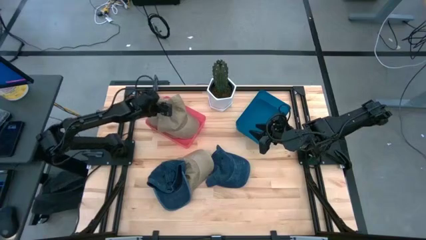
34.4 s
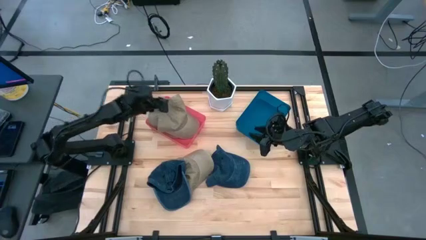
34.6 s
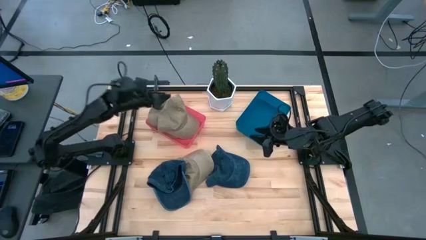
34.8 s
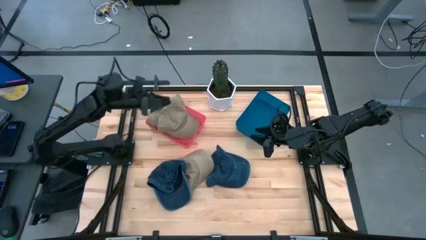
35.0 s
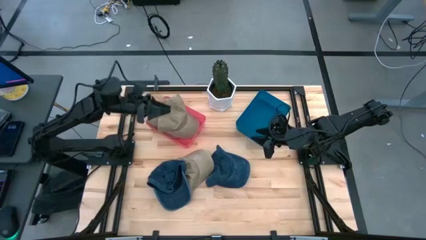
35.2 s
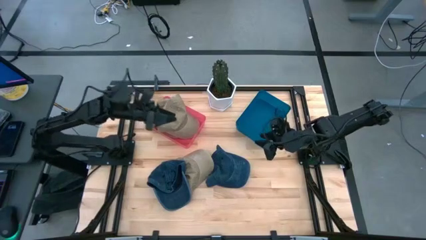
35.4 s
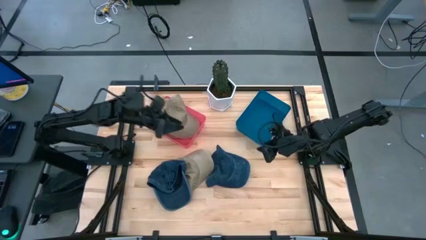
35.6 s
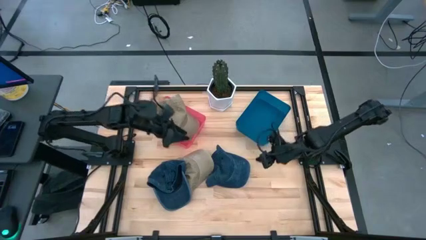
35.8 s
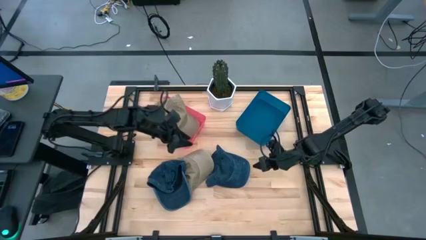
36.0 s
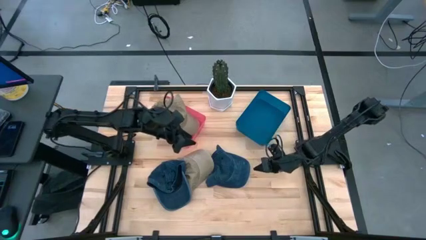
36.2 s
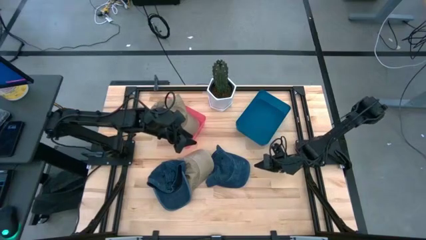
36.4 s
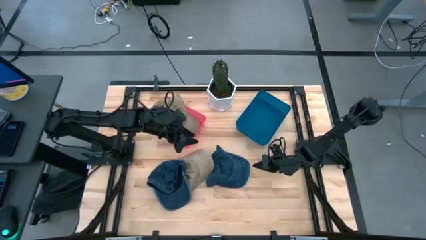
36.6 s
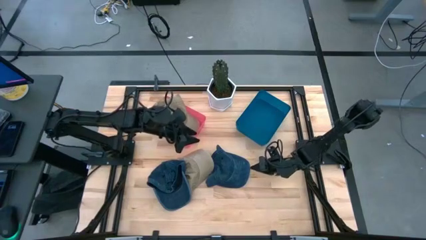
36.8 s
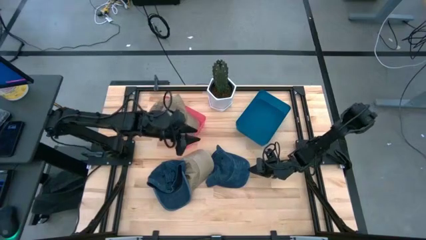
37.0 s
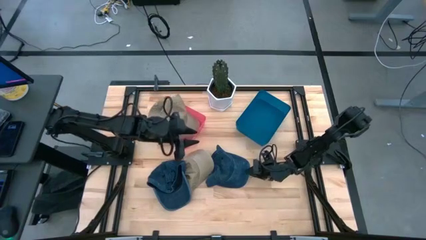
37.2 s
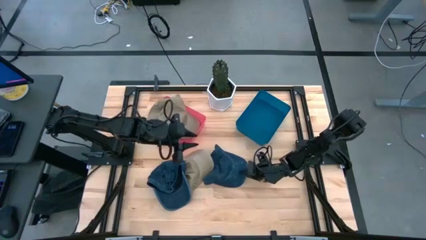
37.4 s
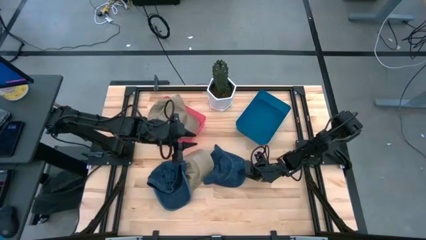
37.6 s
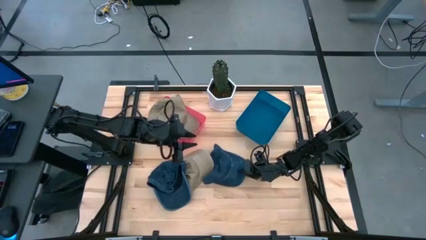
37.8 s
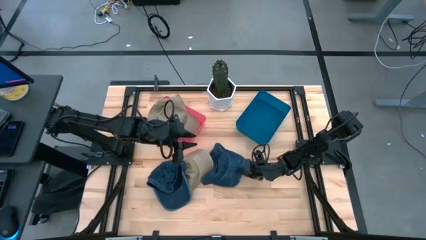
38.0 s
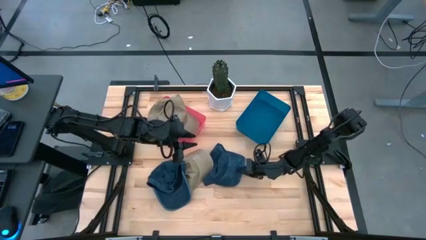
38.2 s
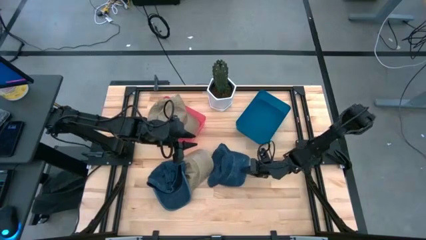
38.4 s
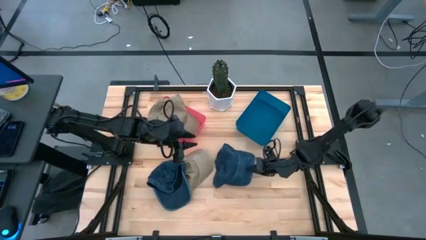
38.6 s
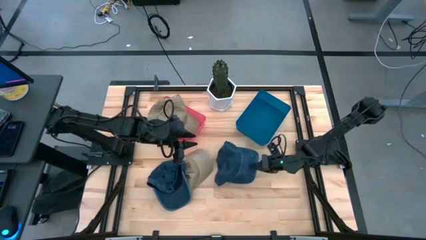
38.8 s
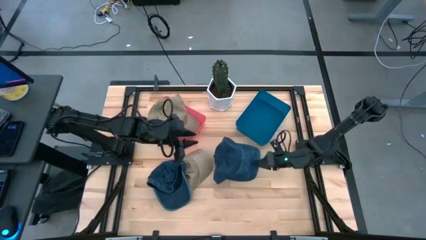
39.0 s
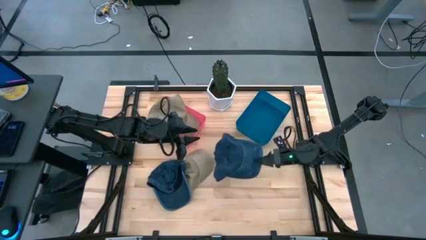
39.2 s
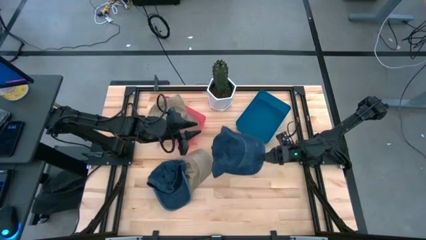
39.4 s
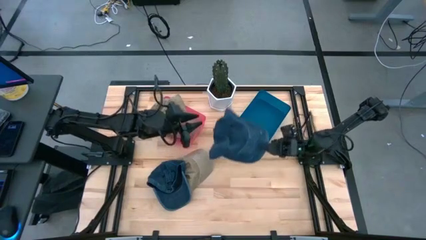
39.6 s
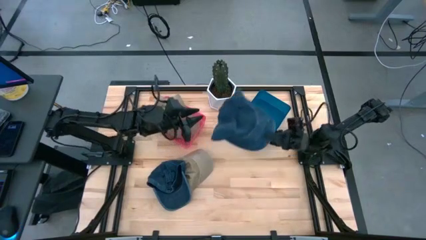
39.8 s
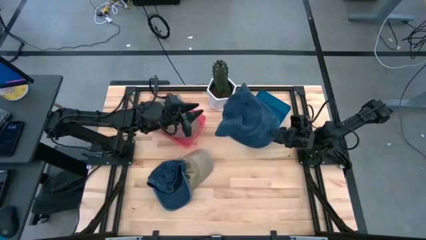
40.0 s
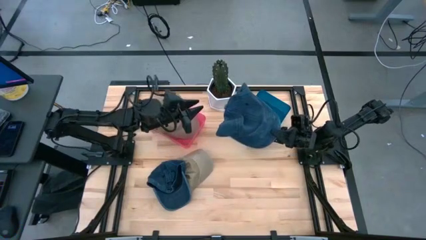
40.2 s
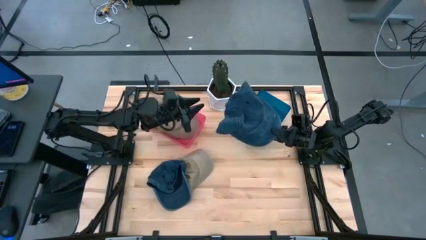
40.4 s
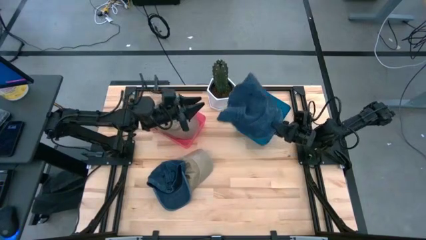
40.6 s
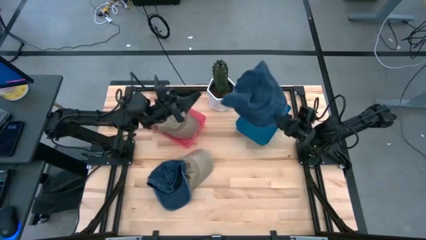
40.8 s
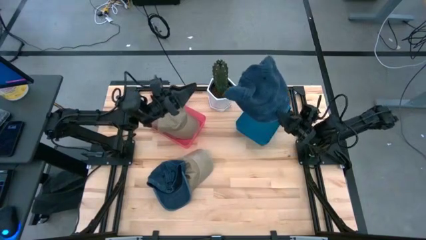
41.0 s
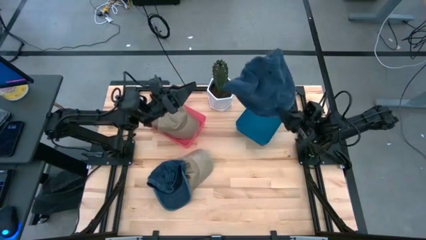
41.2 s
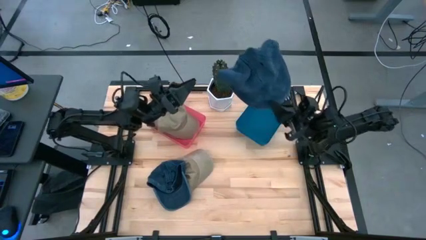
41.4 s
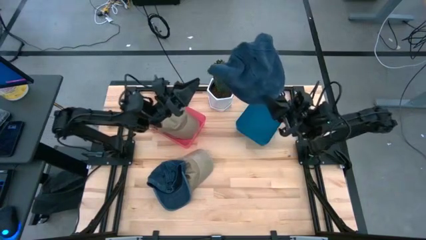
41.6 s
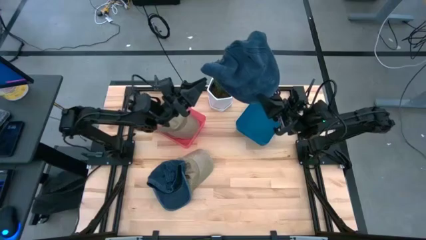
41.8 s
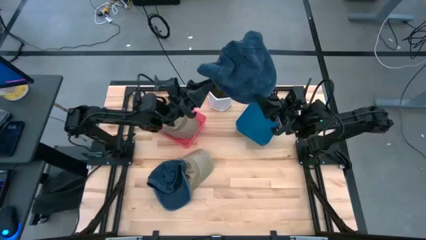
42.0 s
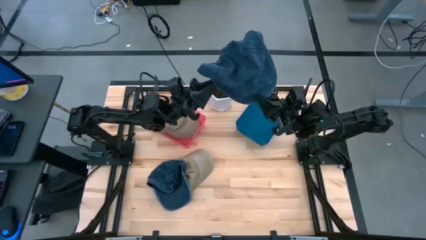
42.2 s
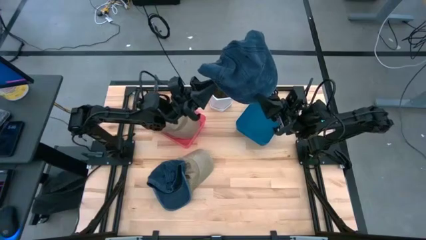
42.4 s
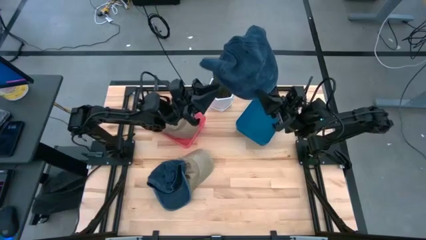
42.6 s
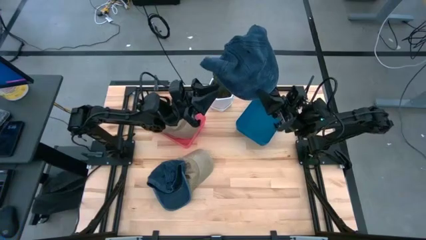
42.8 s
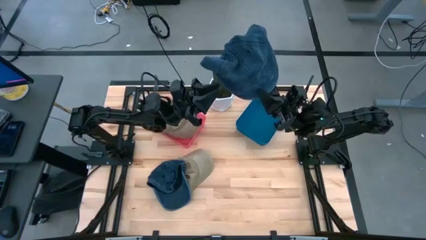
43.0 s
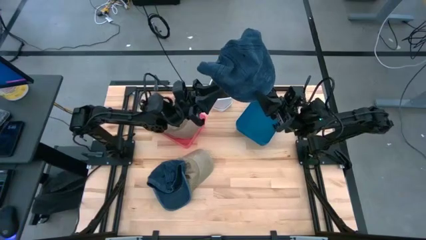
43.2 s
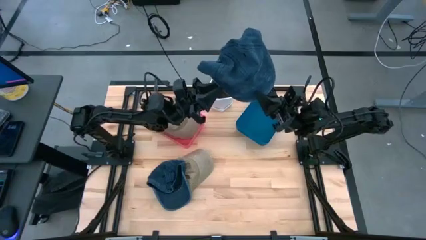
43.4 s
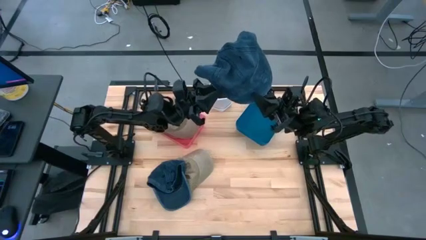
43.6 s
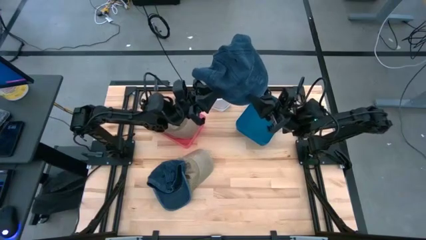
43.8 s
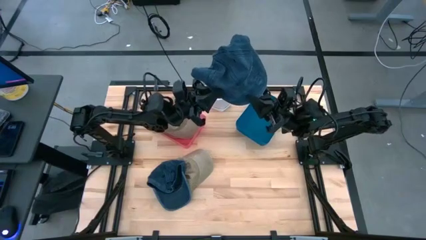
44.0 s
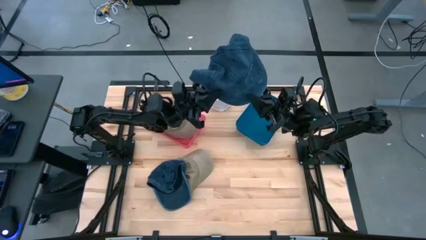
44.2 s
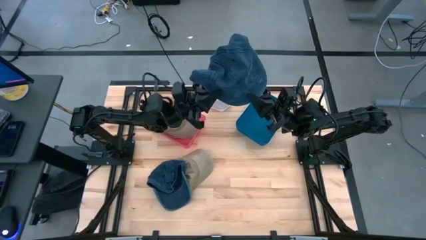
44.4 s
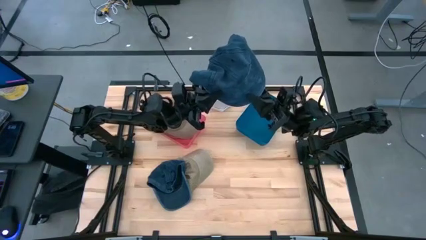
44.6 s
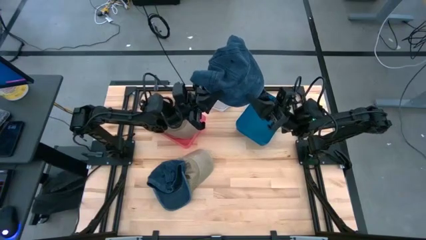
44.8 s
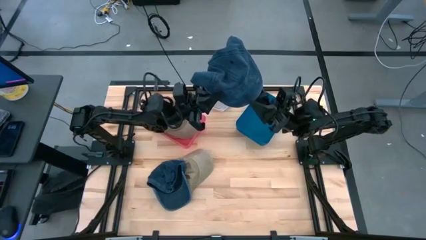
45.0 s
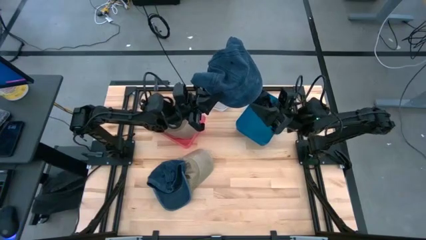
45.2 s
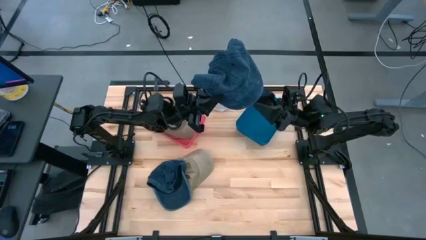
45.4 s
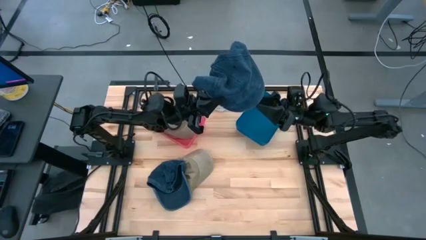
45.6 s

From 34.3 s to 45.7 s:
Task: Pick & Place hat
Put the right blue cap into the blue bin
